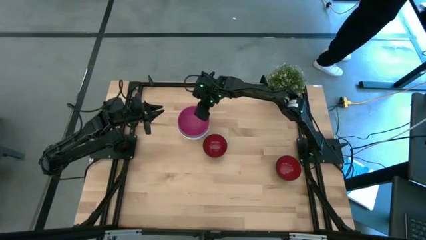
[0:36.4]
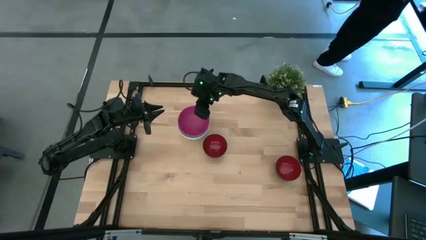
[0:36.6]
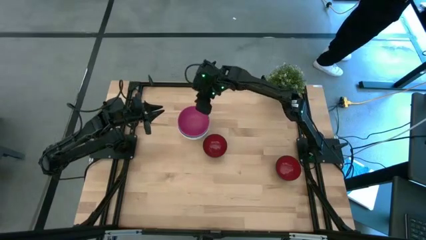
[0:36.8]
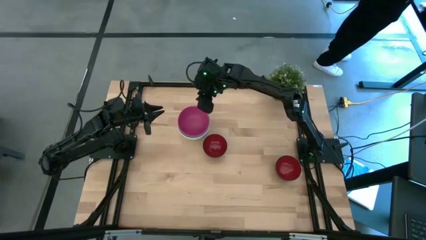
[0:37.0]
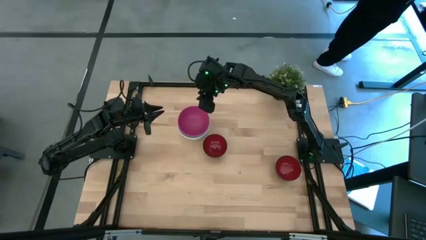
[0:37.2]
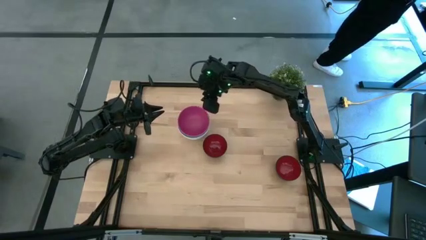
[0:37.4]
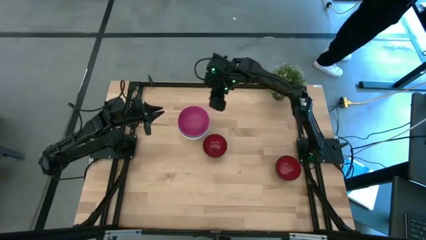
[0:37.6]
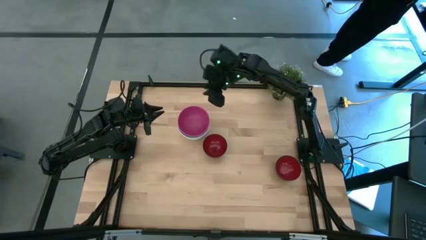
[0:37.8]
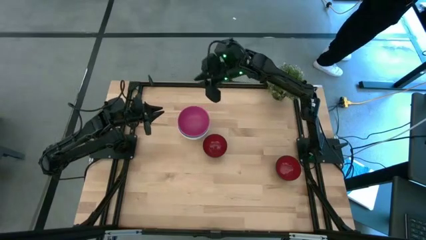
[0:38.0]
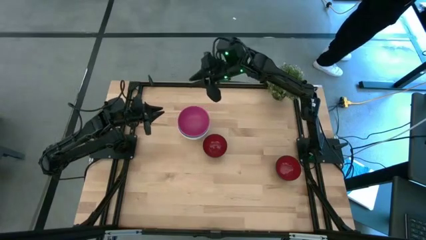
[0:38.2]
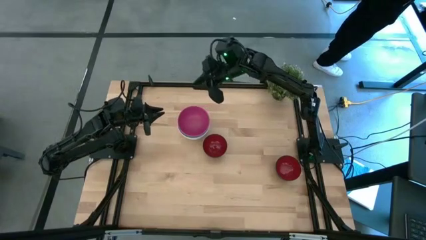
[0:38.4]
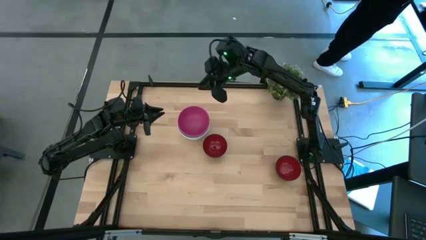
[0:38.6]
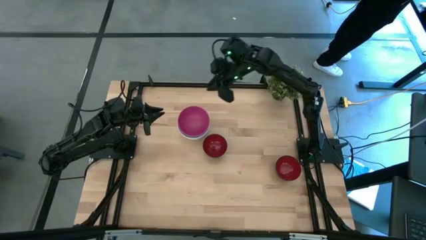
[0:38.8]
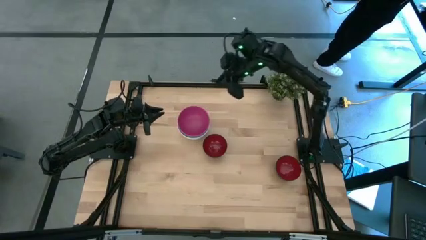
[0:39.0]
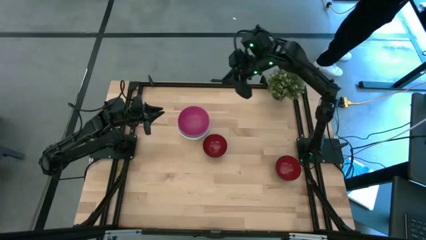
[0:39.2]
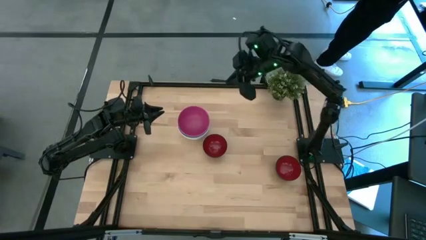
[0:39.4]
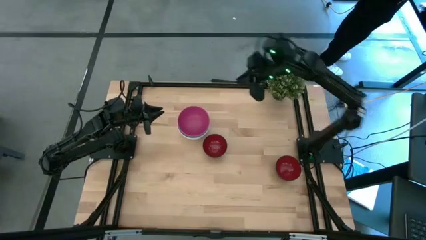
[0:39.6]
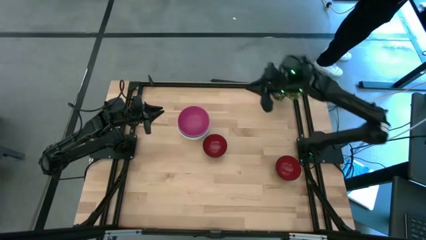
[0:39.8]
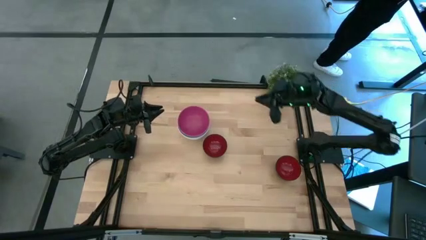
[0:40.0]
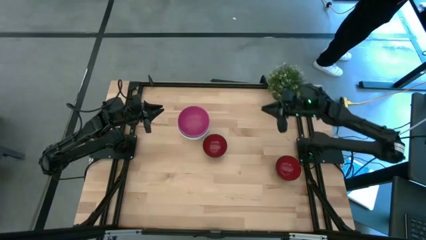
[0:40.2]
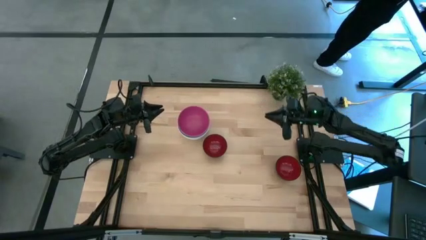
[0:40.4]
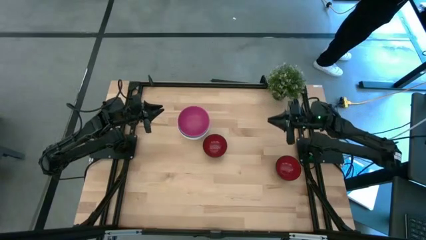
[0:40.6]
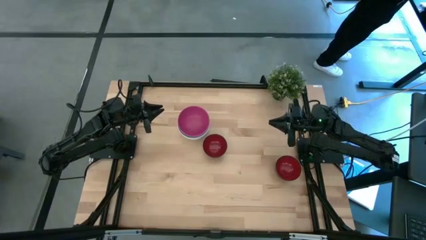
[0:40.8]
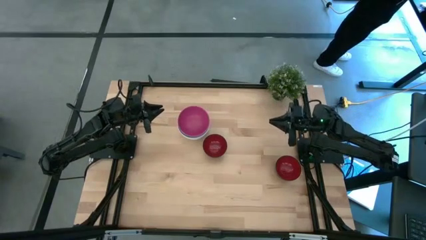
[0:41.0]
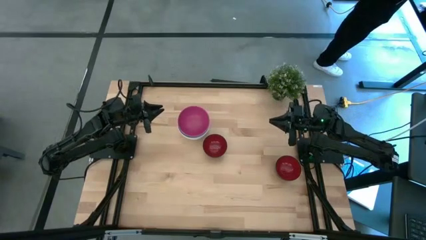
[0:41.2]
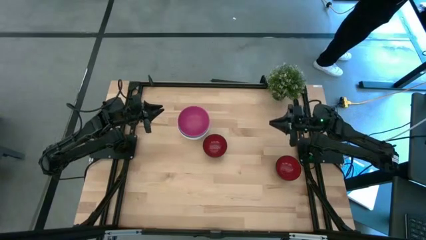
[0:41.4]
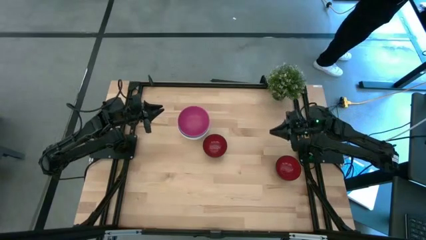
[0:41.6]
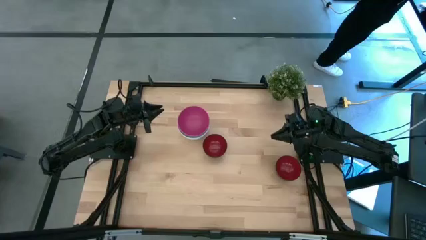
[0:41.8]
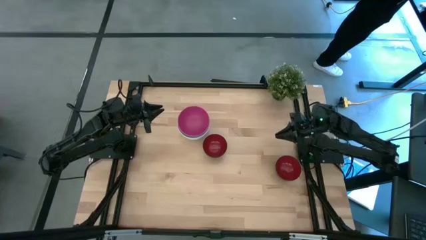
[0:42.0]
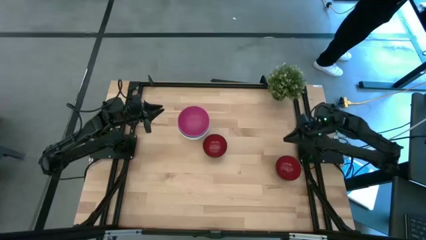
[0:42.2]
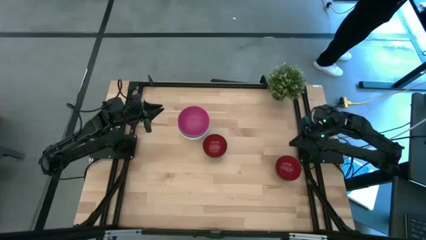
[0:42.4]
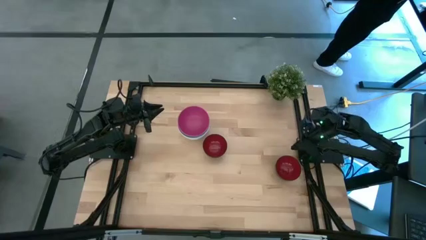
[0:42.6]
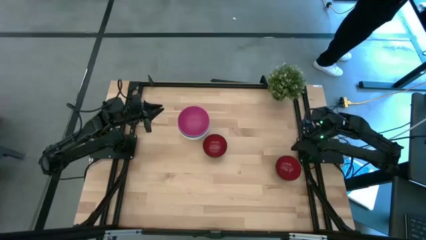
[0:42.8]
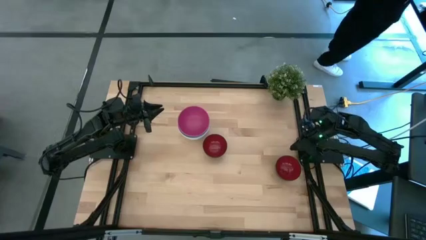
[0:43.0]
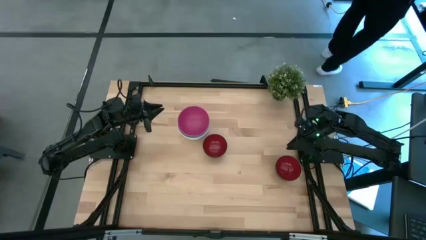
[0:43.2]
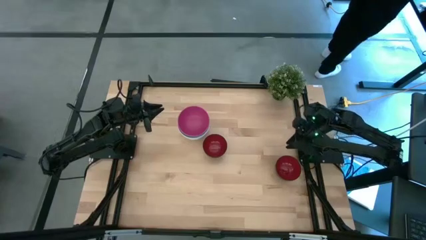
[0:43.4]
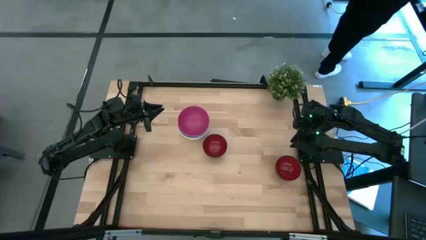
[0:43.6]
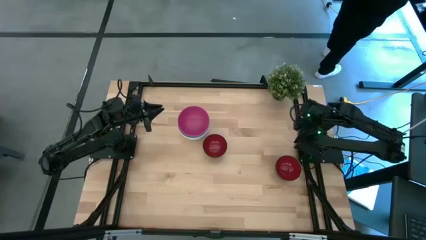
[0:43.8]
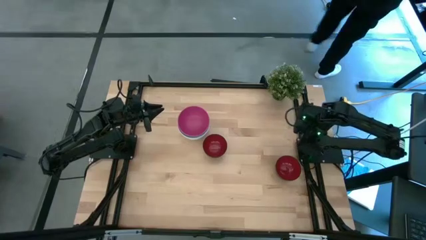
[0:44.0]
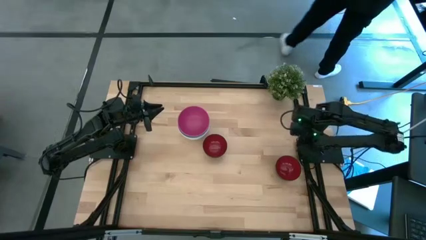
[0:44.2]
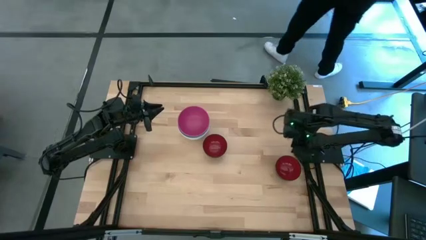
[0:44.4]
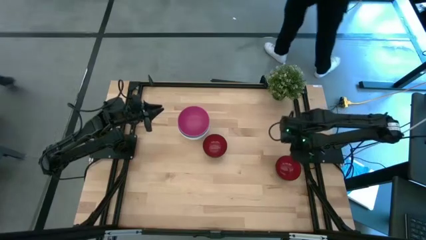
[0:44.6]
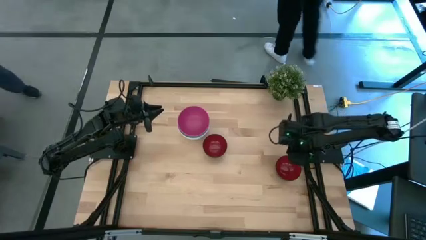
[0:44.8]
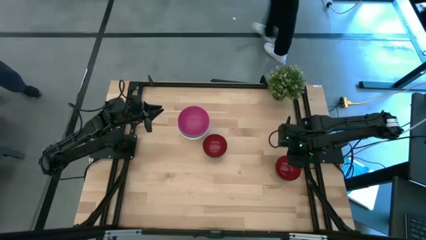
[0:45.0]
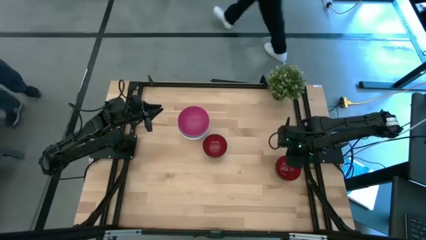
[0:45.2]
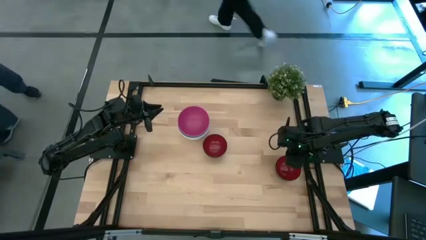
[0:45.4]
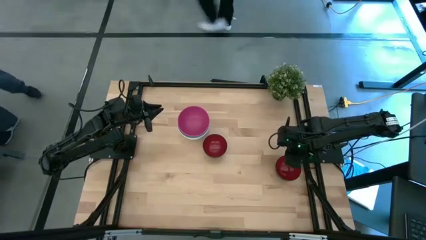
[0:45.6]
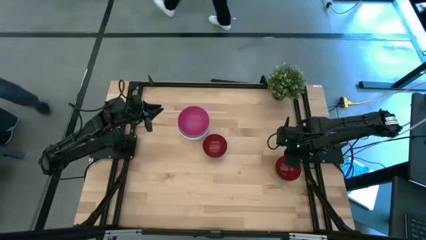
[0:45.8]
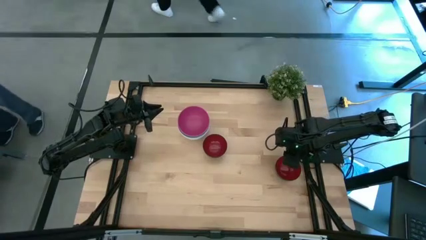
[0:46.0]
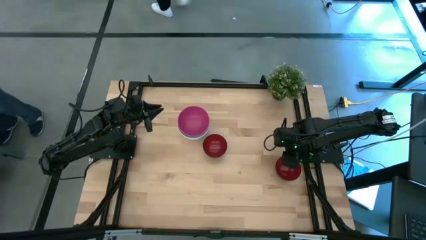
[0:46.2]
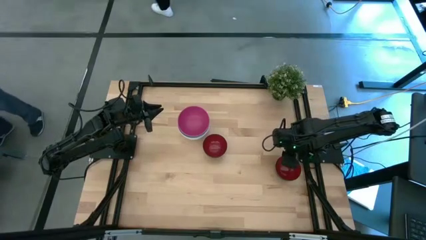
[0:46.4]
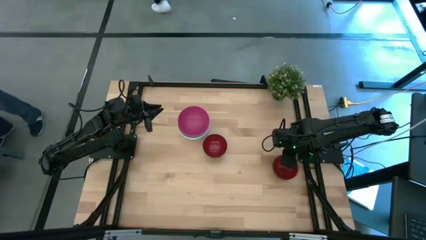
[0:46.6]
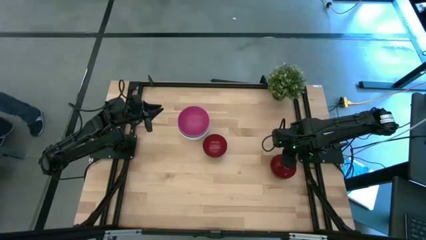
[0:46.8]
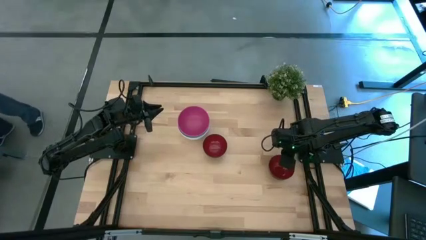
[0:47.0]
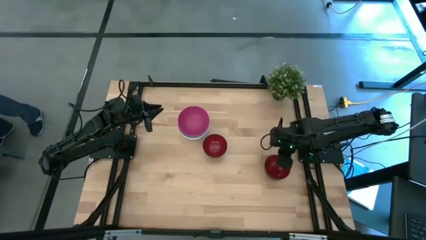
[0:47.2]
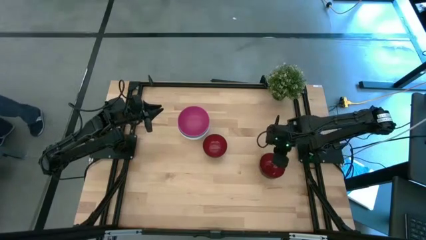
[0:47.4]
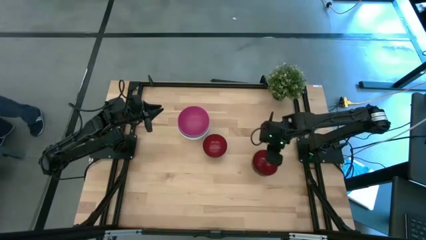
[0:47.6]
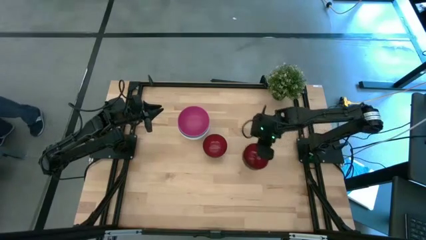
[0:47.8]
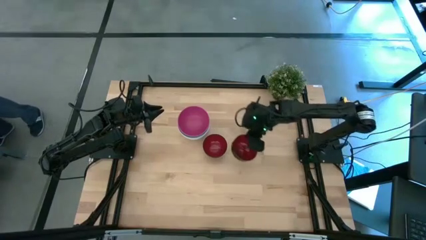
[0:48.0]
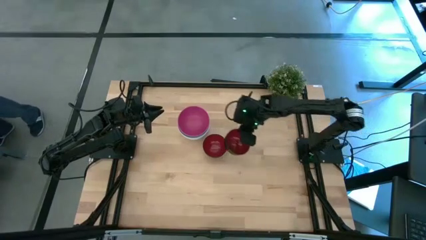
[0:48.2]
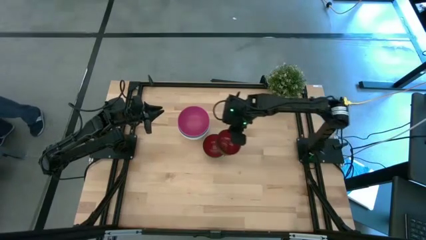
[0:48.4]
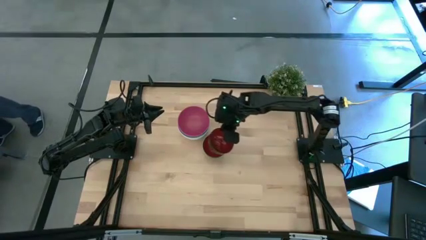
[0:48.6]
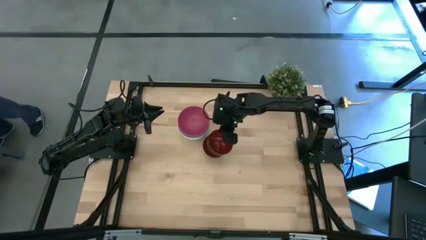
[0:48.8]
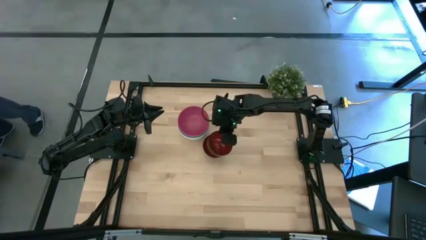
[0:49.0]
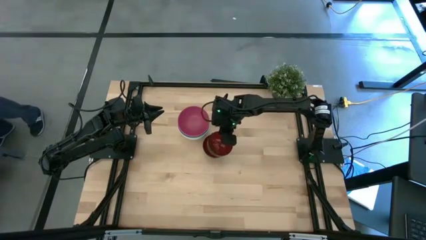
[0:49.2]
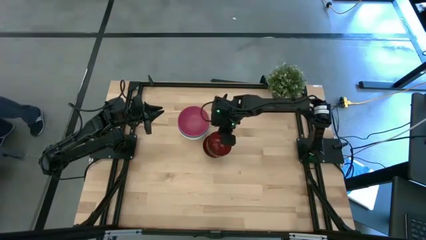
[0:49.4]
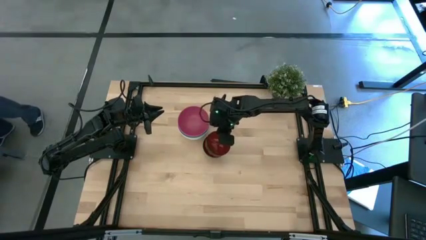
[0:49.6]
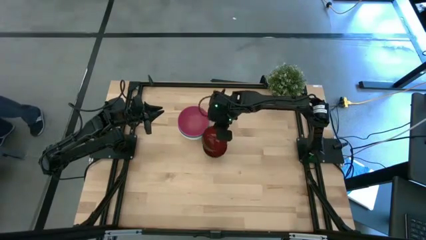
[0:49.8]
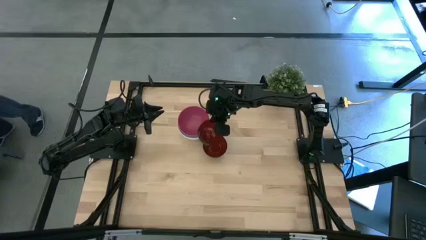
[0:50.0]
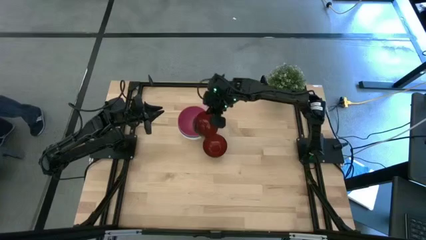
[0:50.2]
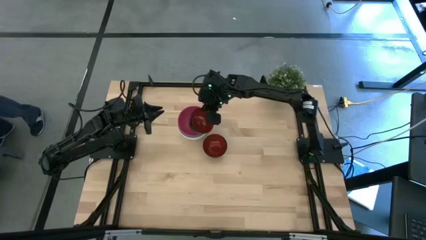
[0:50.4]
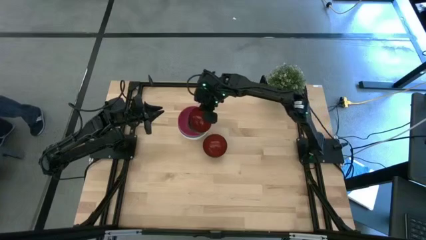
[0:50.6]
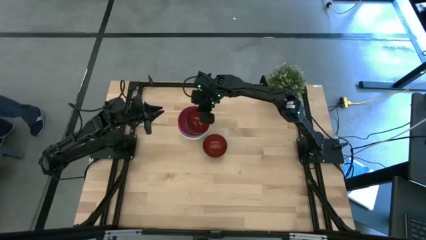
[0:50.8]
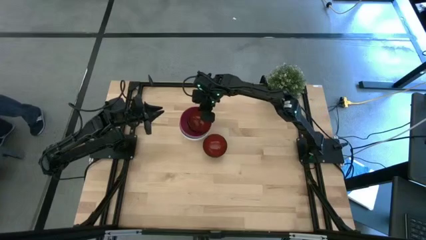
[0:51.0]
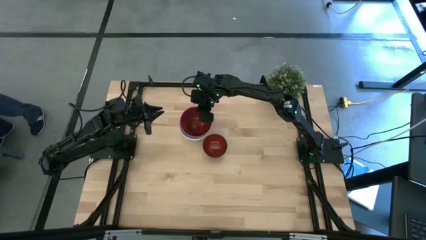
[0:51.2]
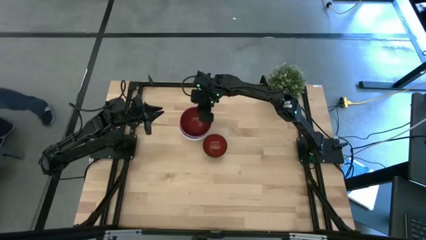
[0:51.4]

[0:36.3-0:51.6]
Task: Nest bowls inside each other
Stack the right red bowl into the pink bowl

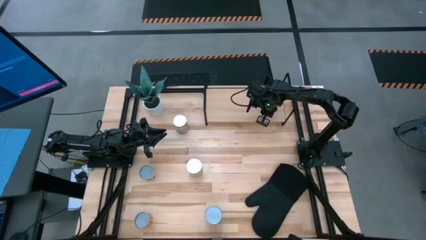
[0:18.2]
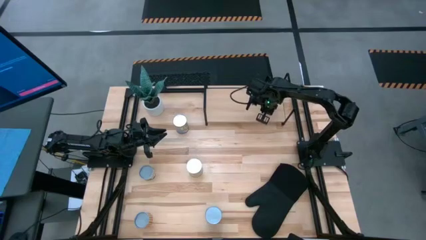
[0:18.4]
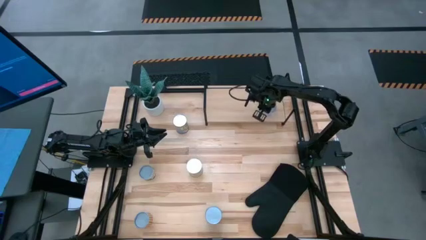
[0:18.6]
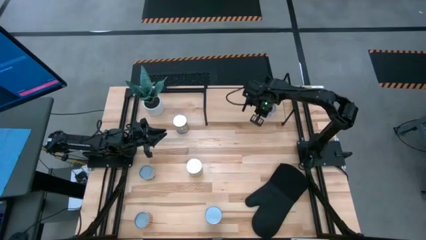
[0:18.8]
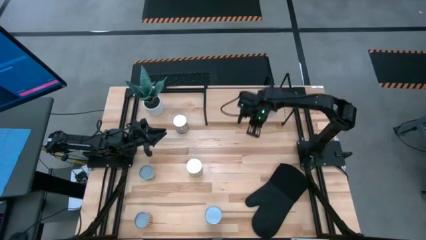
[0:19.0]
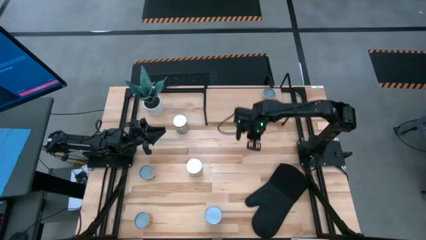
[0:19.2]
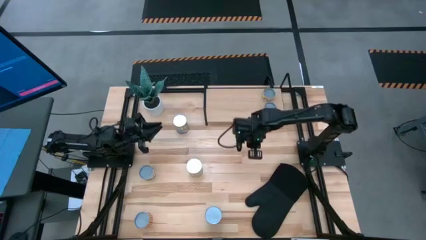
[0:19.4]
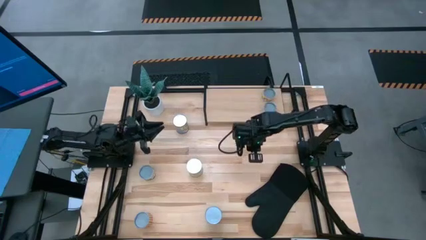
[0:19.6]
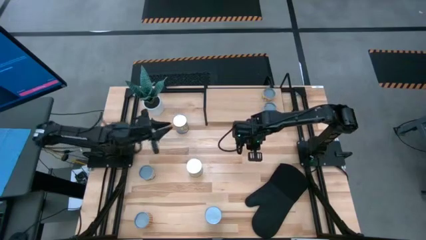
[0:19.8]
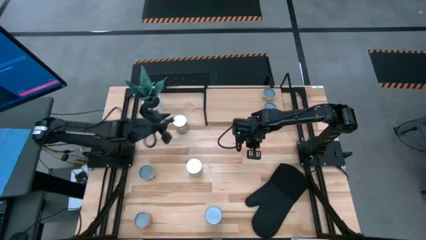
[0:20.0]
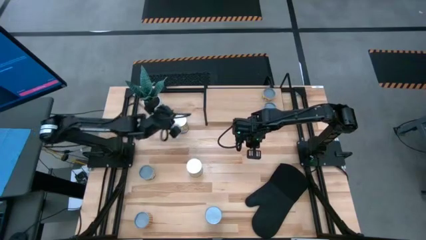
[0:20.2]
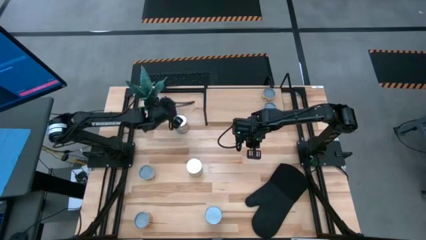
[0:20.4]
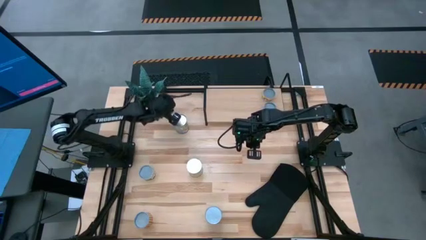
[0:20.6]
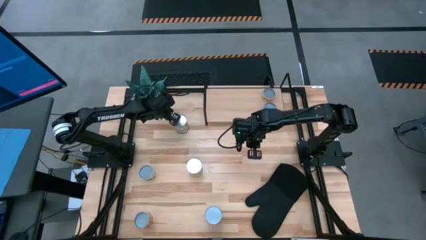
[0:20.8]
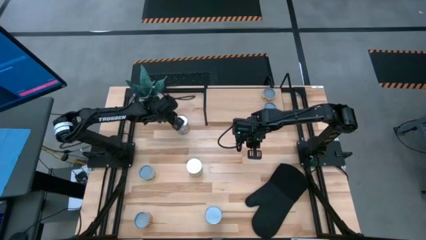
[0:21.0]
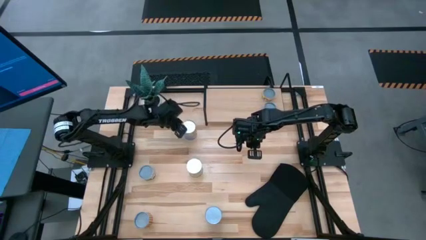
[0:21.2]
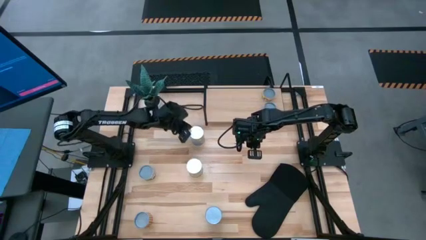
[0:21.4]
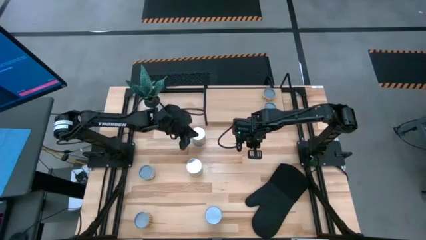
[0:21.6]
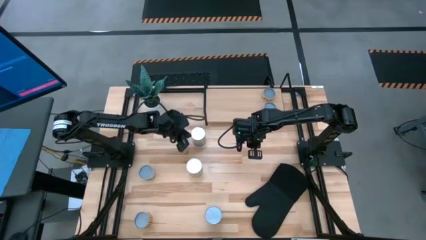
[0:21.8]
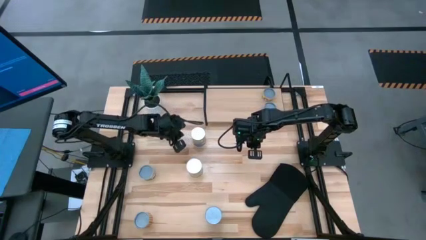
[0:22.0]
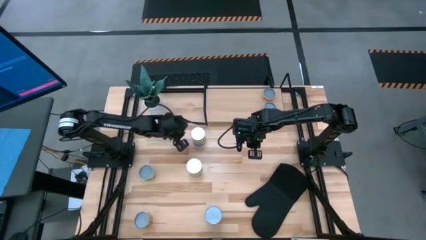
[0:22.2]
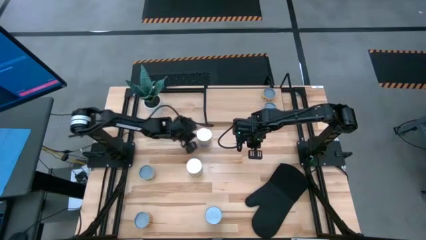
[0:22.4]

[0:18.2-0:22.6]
Task: Pick and place cans onto a shelf
Move the canned peaches to the center of the table
